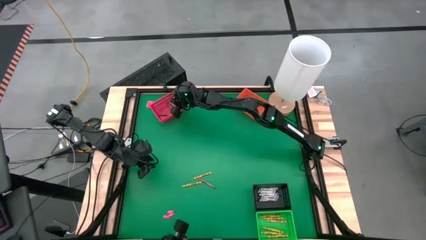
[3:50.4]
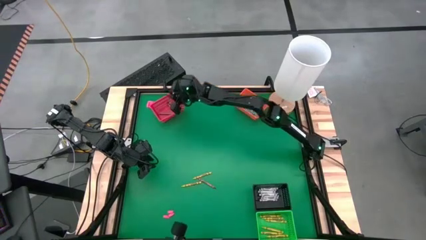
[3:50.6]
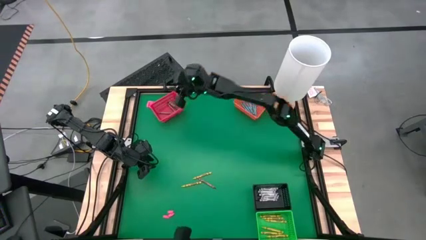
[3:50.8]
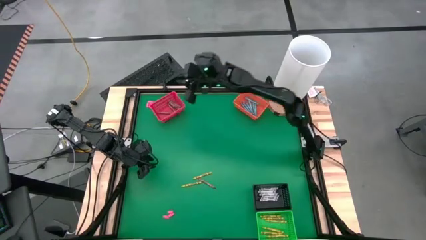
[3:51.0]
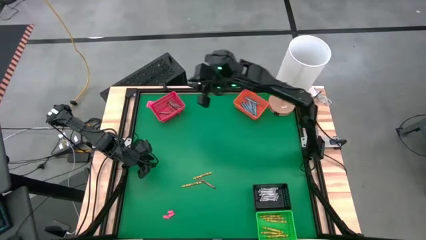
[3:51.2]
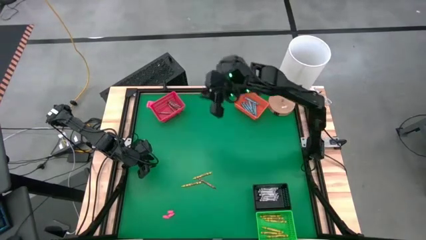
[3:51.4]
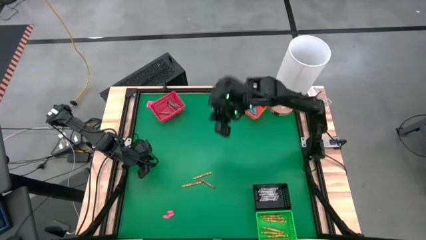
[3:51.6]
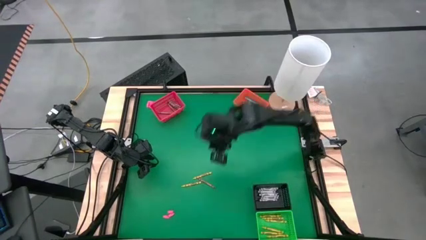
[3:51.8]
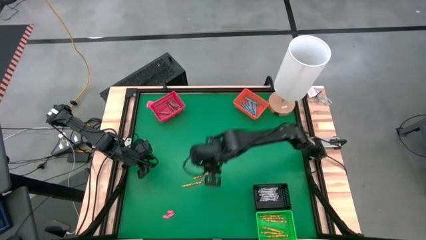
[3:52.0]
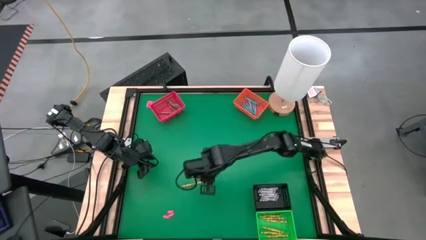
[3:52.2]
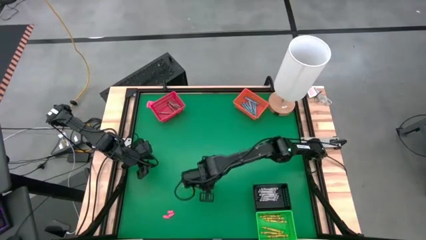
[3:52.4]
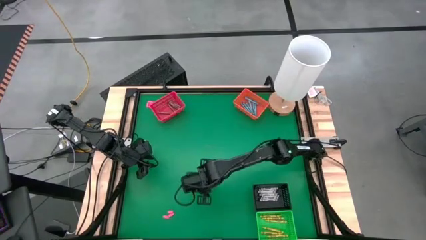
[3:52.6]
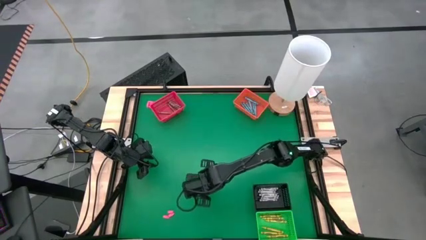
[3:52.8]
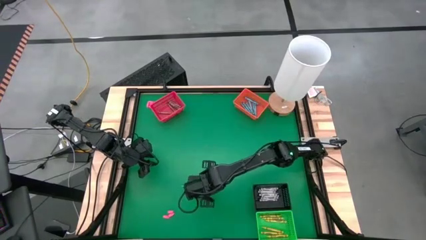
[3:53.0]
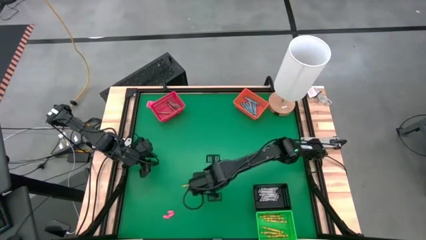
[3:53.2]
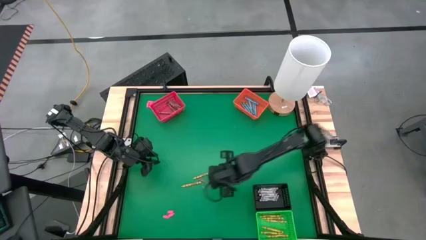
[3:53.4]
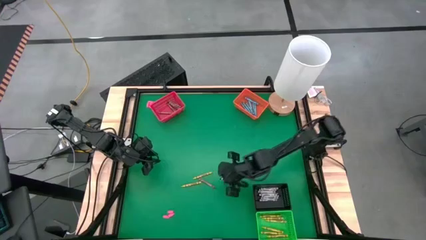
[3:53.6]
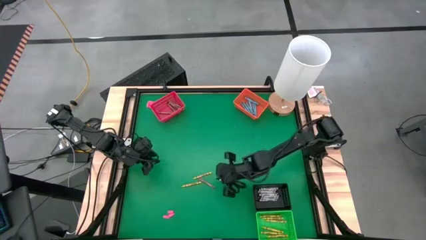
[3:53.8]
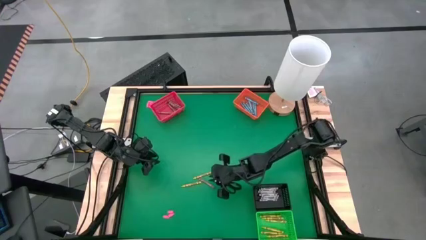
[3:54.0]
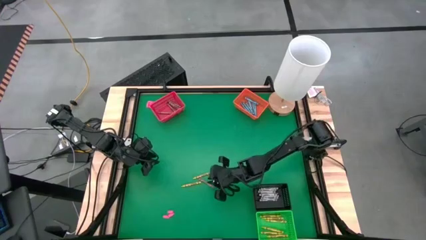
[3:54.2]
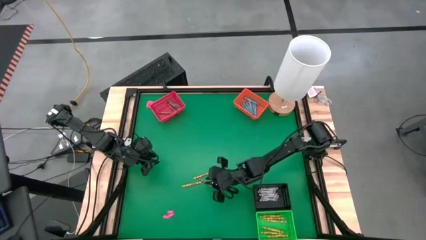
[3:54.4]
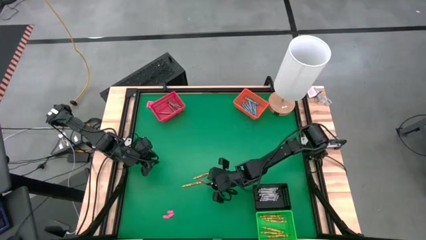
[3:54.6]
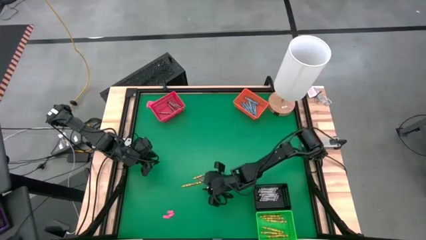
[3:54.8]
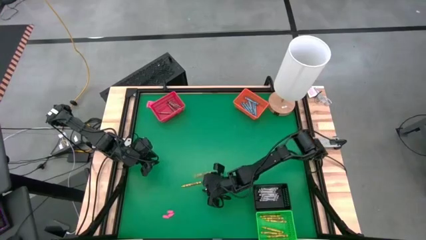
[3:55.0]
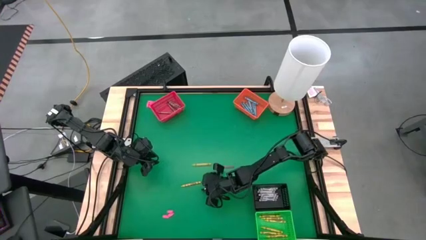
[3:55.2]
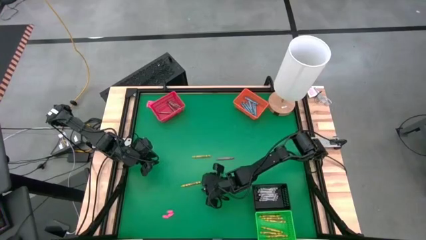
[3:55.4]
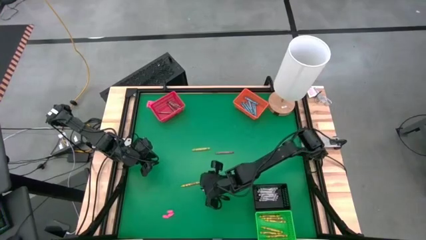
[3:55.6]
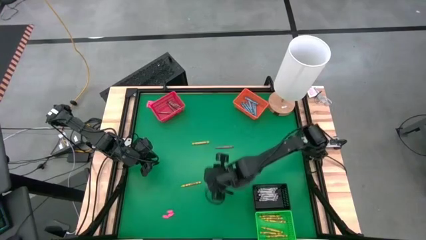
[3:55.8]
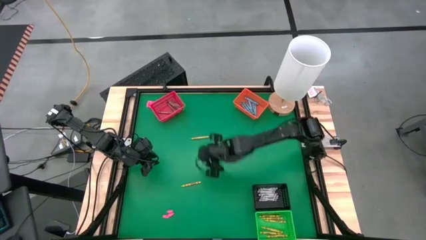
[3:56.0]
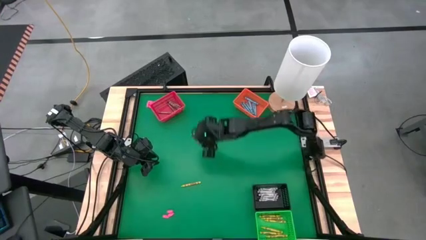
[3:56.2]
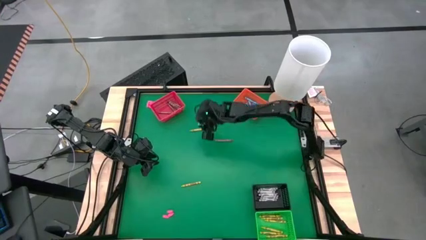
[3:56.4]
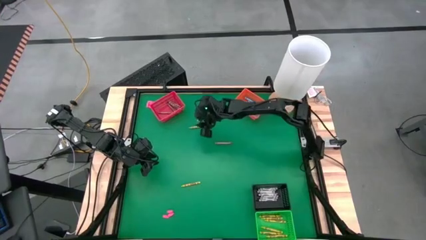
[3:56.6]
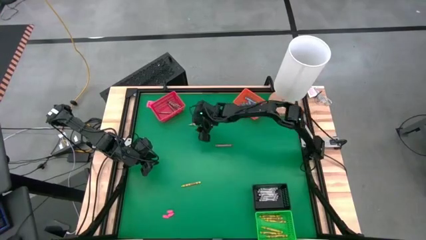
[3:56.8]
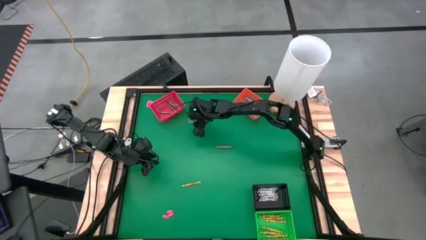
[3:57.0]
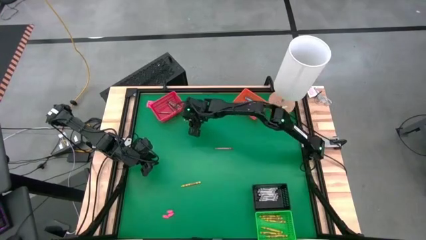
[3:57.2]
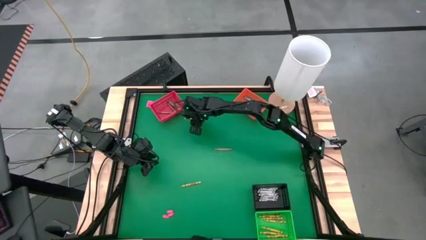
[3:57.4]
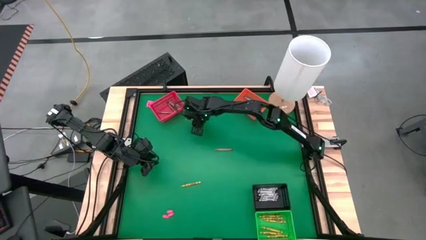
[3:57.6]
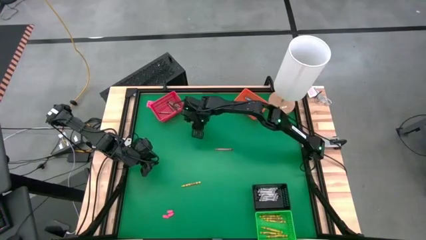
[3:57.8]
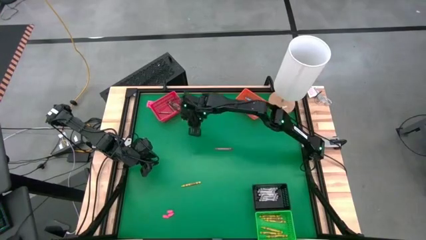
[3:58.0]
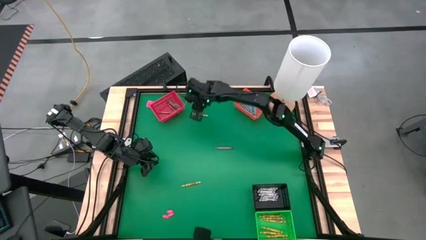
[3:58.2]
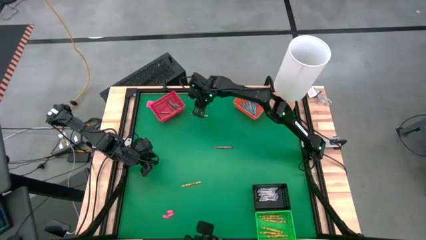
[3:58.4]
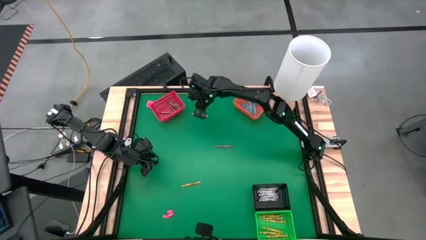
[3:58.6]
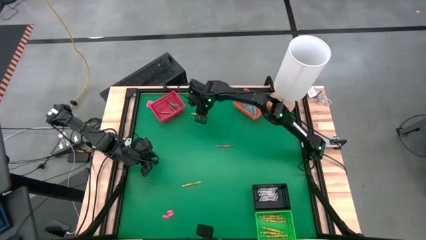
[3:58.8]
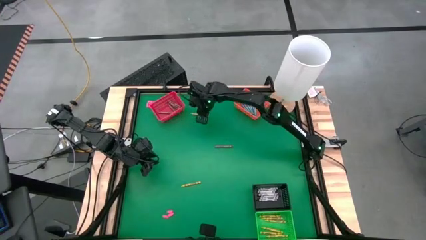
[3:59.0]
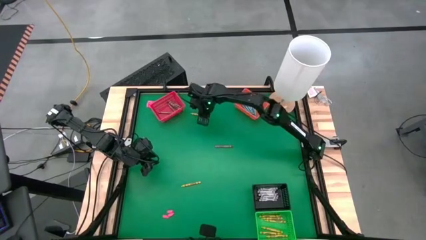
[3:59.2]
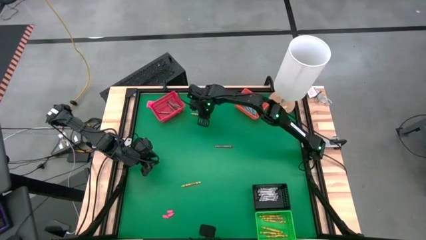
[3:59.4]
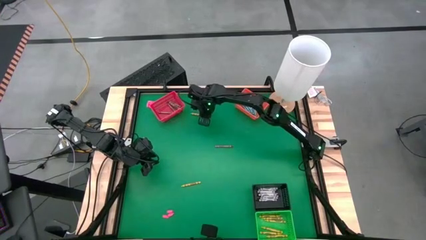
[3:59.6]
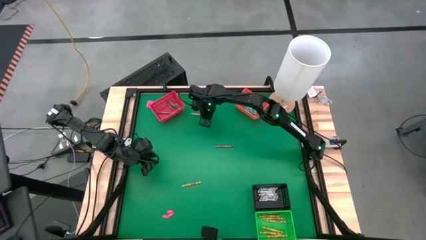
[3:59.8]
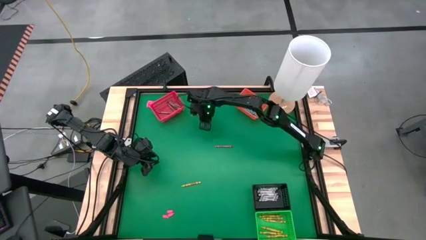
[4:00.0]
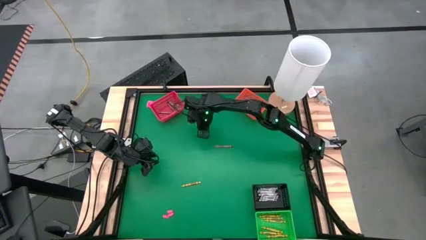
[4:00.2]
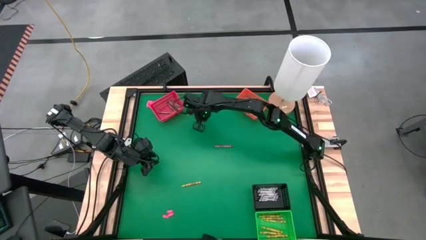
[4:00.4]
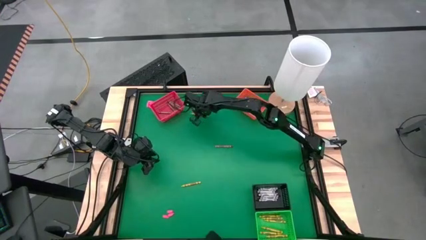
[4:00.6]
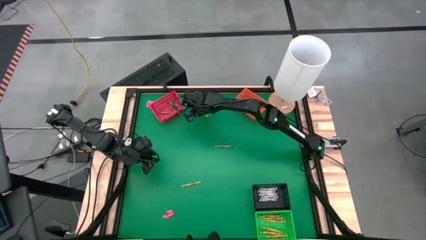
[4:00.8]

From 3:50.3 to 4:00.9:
Task: Sort crayons
Put the yellow crayon into the green bin
